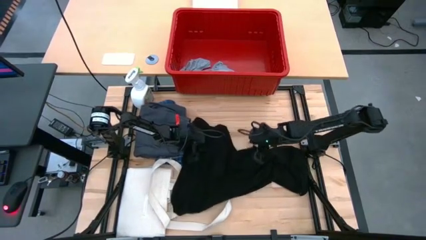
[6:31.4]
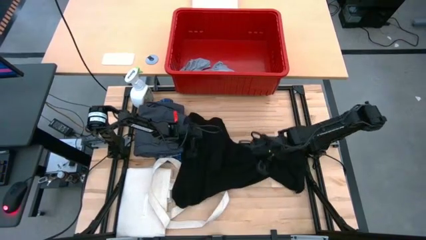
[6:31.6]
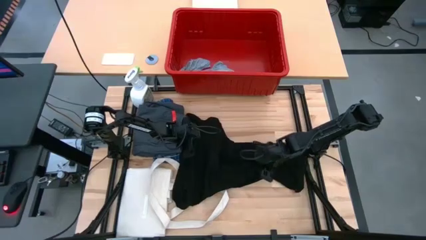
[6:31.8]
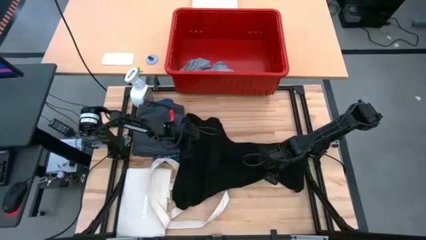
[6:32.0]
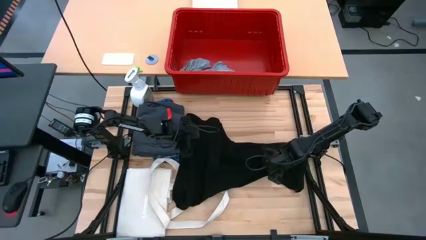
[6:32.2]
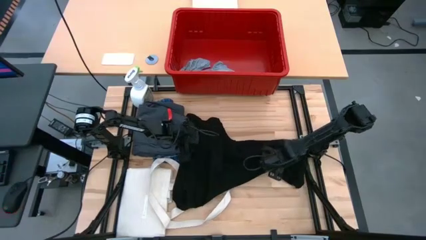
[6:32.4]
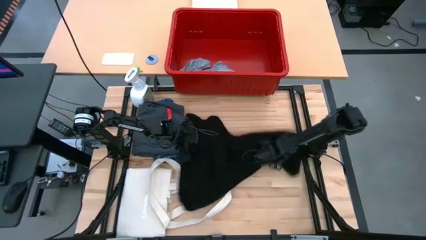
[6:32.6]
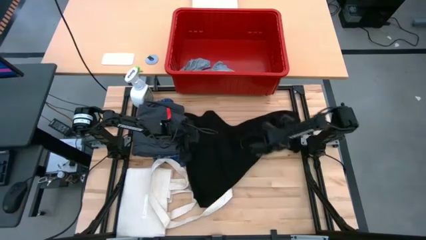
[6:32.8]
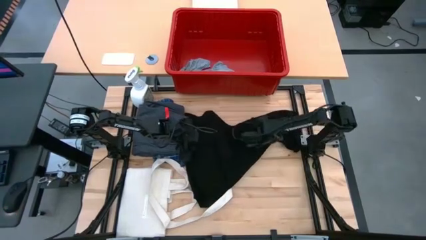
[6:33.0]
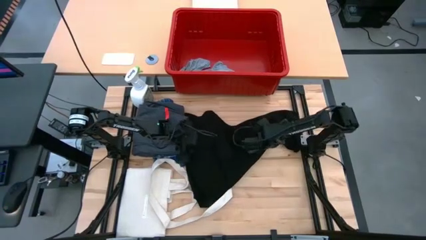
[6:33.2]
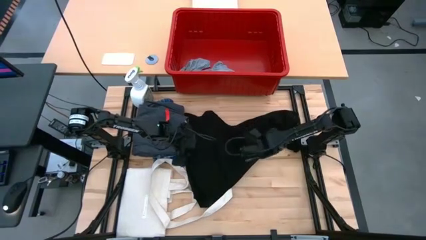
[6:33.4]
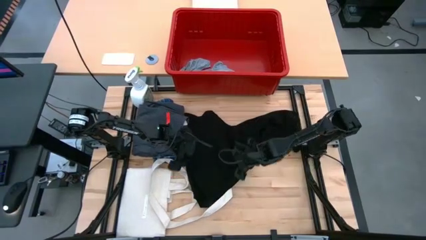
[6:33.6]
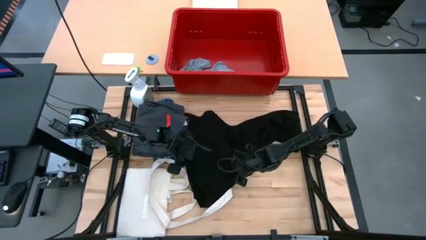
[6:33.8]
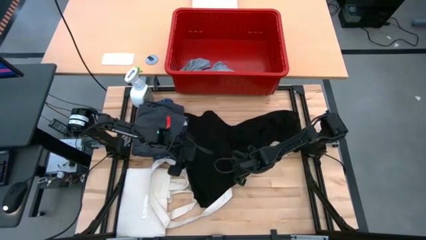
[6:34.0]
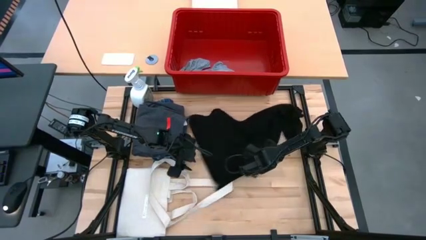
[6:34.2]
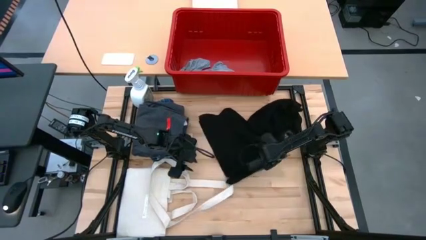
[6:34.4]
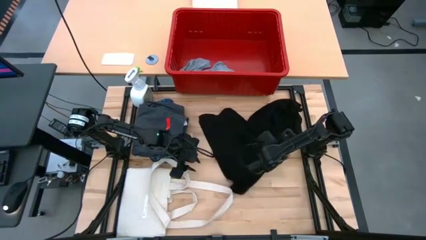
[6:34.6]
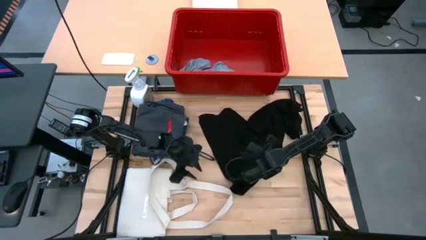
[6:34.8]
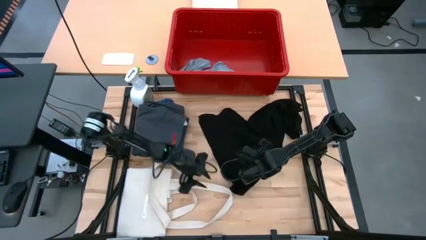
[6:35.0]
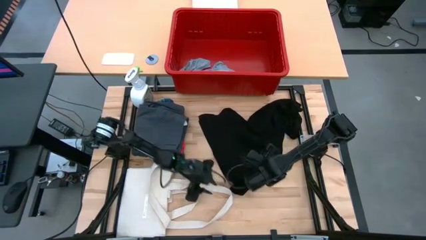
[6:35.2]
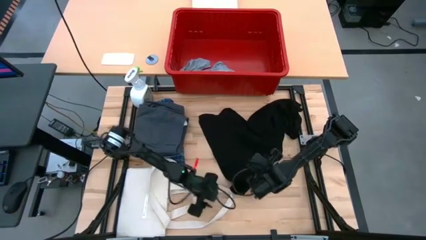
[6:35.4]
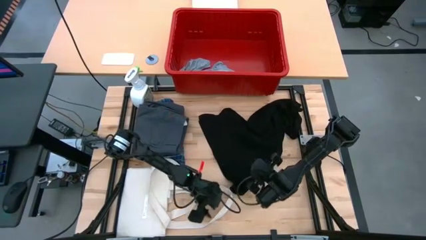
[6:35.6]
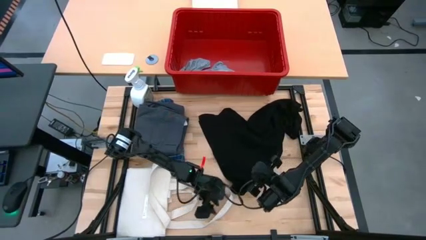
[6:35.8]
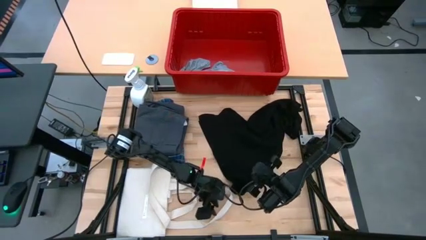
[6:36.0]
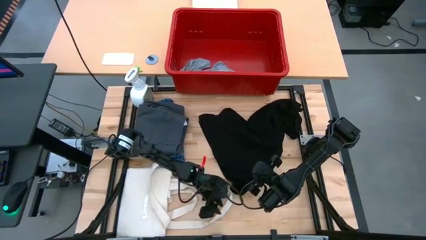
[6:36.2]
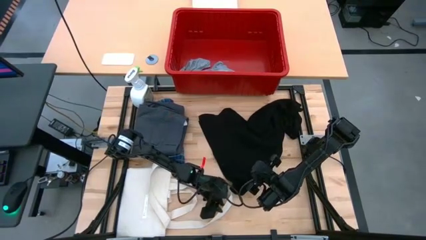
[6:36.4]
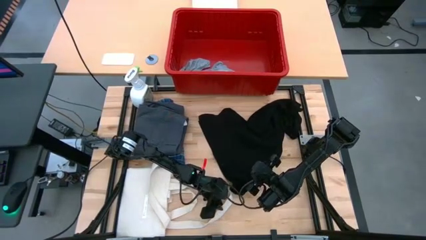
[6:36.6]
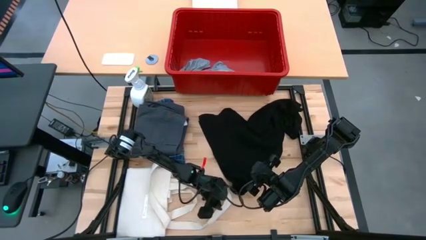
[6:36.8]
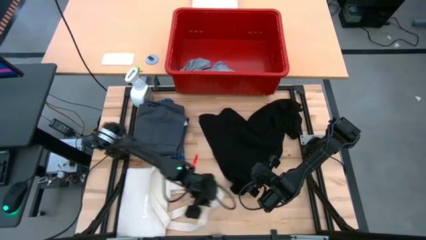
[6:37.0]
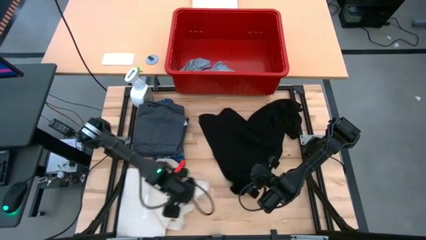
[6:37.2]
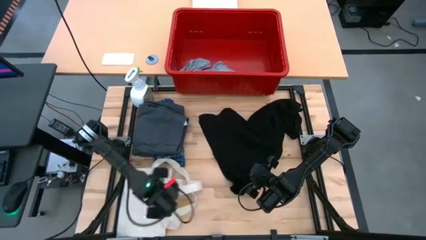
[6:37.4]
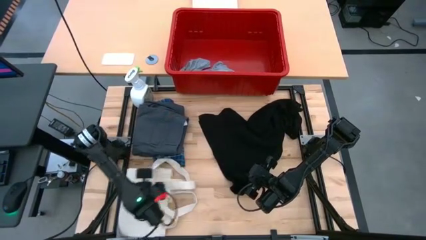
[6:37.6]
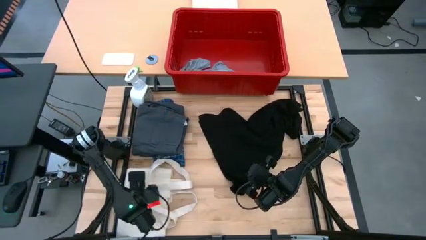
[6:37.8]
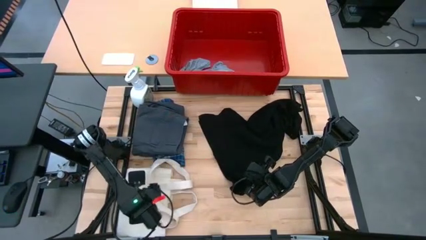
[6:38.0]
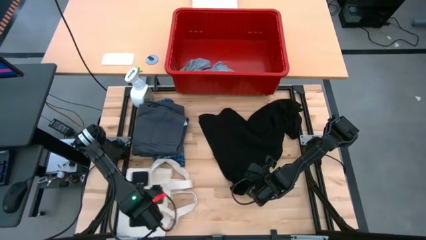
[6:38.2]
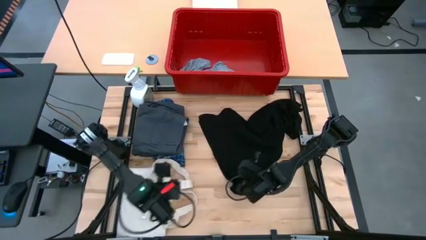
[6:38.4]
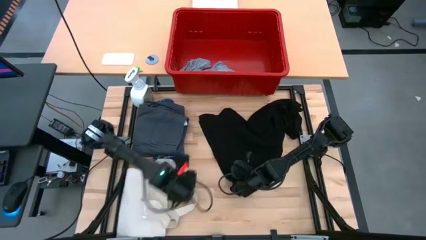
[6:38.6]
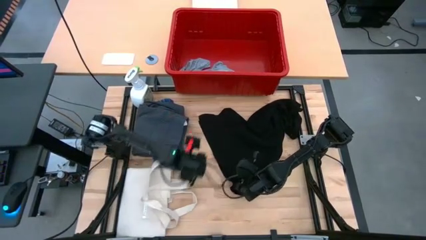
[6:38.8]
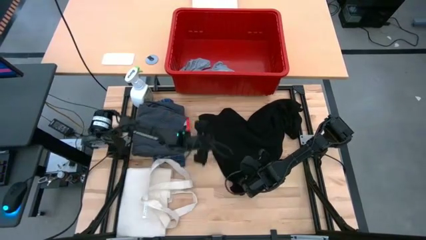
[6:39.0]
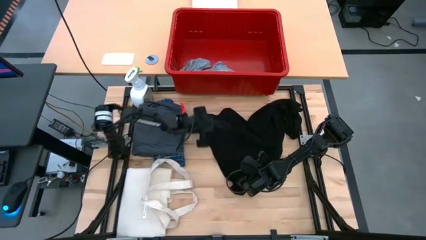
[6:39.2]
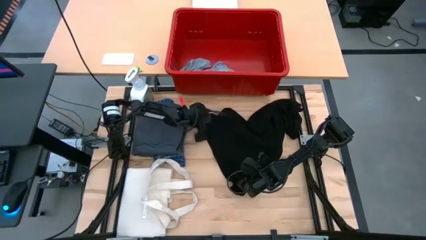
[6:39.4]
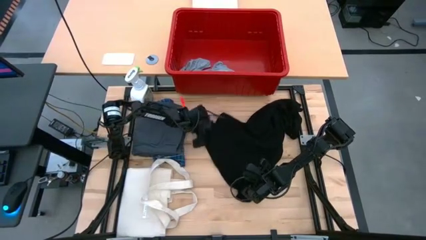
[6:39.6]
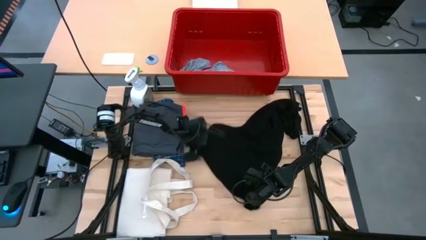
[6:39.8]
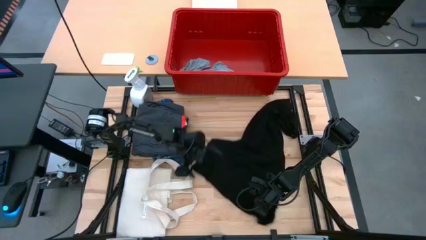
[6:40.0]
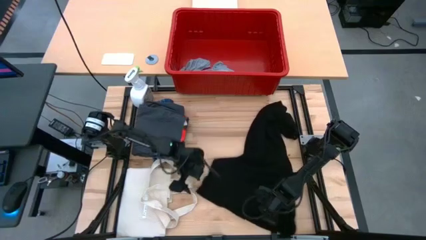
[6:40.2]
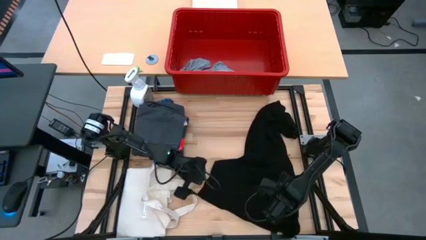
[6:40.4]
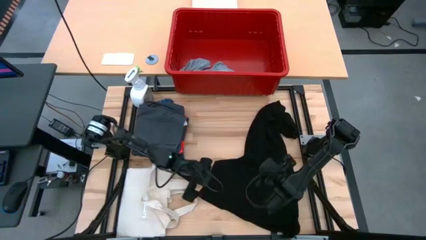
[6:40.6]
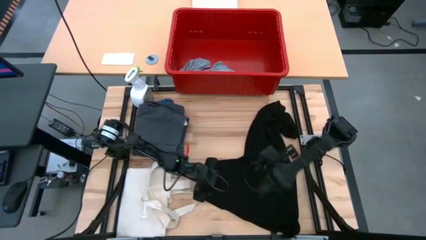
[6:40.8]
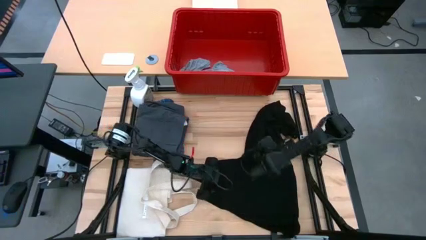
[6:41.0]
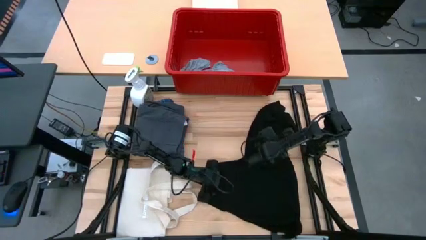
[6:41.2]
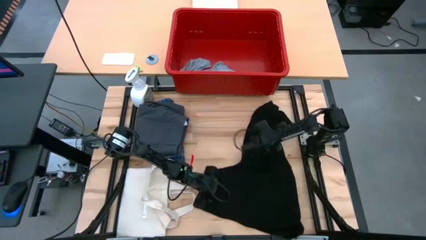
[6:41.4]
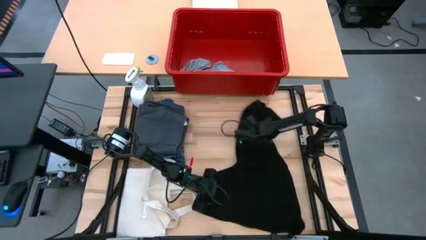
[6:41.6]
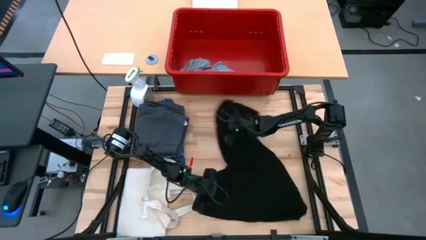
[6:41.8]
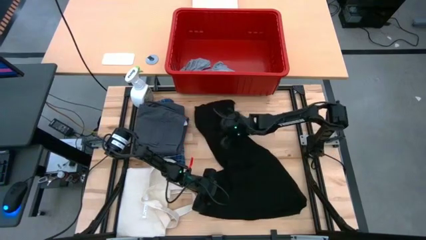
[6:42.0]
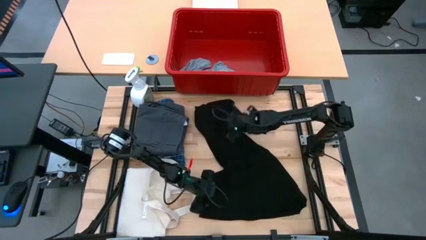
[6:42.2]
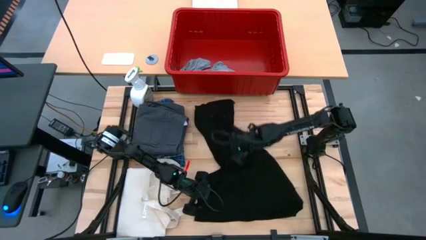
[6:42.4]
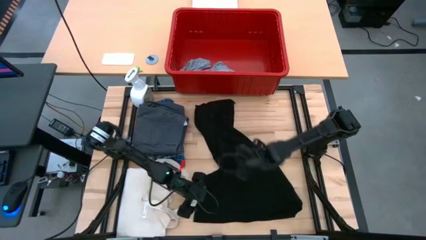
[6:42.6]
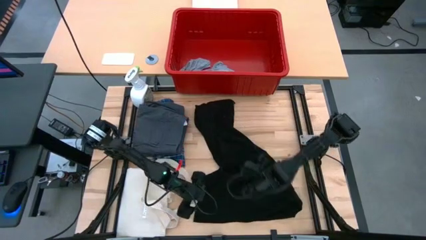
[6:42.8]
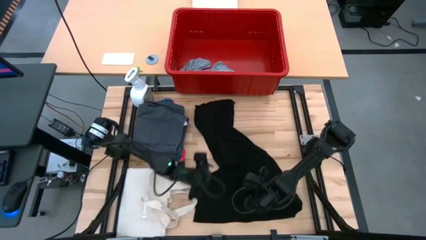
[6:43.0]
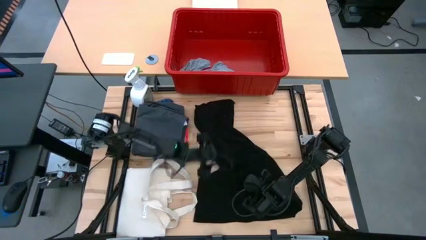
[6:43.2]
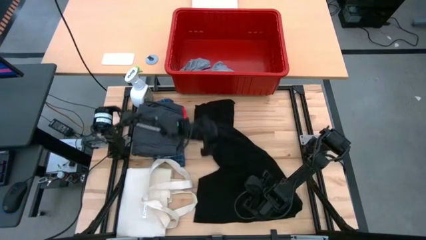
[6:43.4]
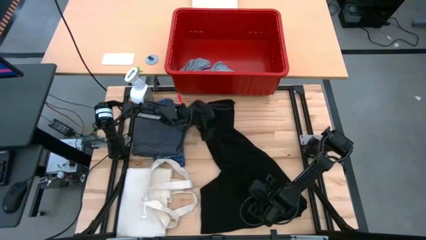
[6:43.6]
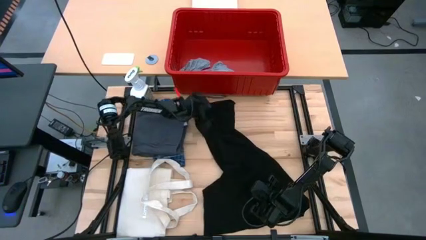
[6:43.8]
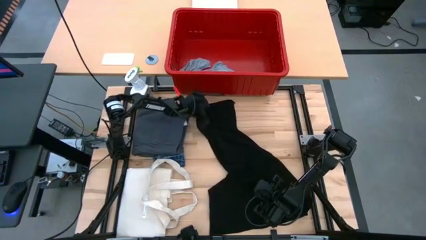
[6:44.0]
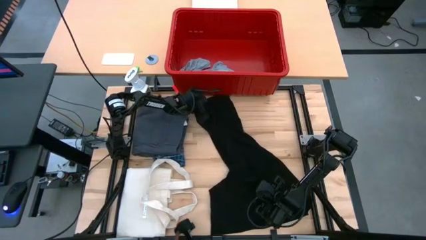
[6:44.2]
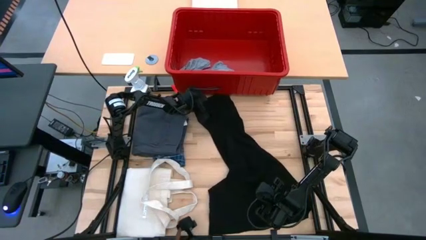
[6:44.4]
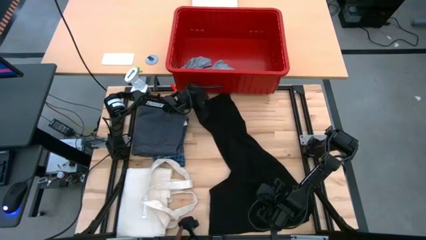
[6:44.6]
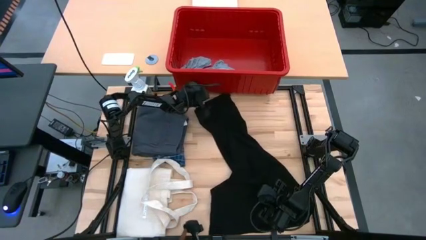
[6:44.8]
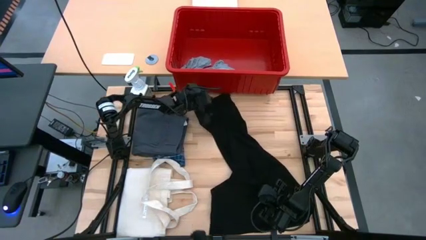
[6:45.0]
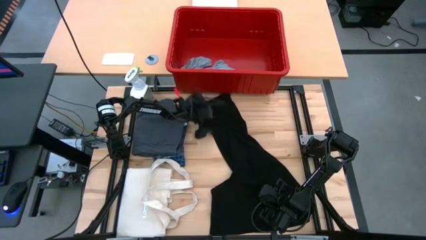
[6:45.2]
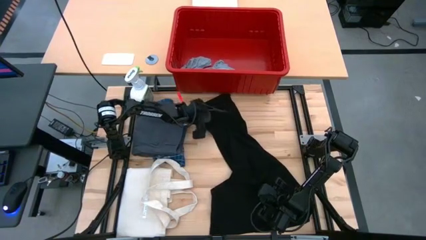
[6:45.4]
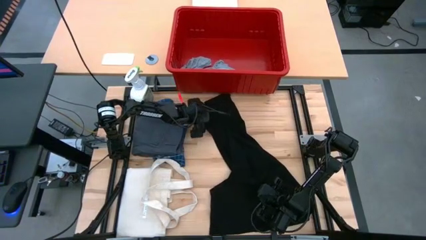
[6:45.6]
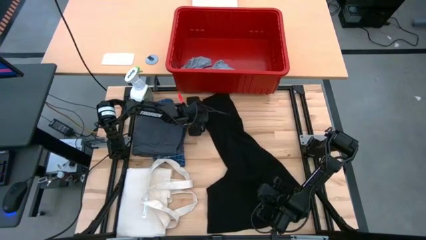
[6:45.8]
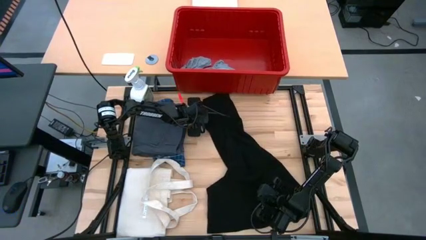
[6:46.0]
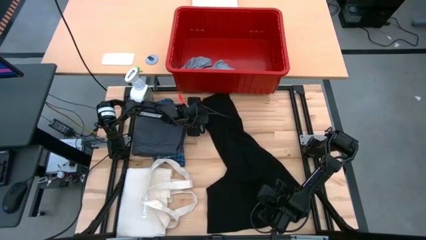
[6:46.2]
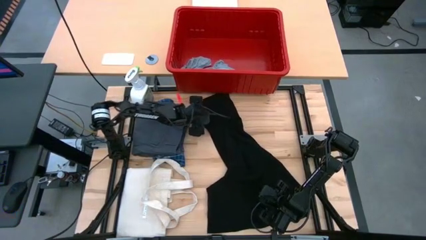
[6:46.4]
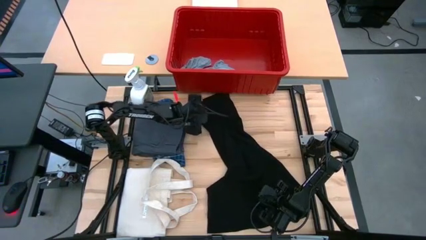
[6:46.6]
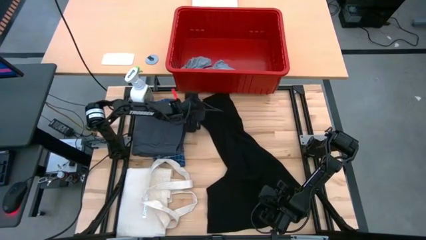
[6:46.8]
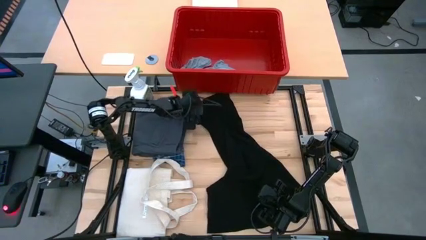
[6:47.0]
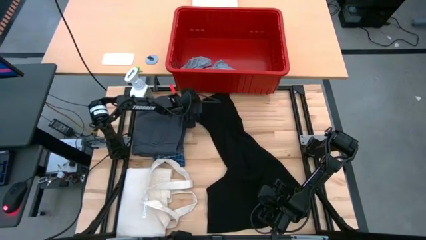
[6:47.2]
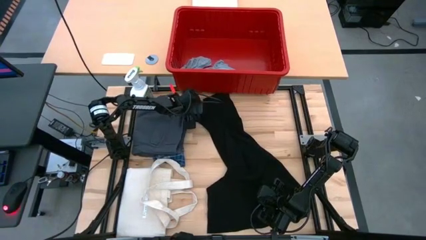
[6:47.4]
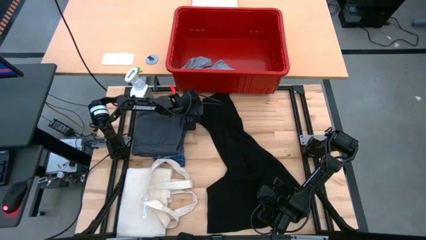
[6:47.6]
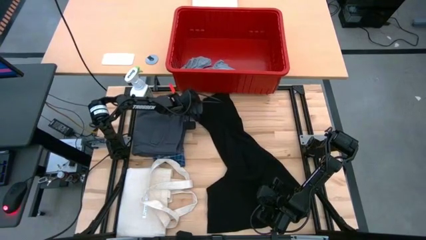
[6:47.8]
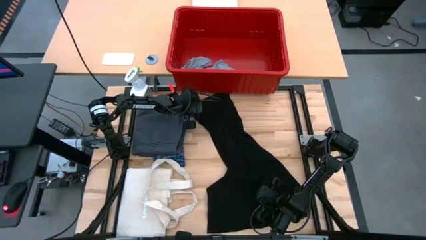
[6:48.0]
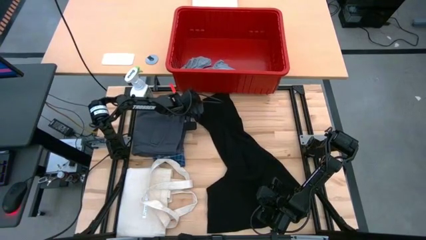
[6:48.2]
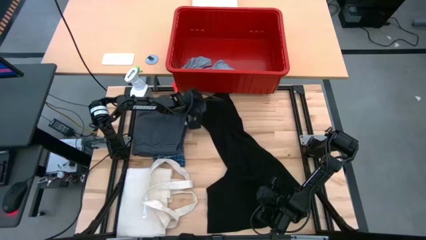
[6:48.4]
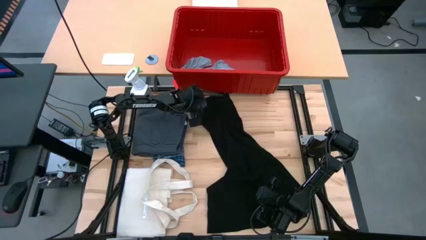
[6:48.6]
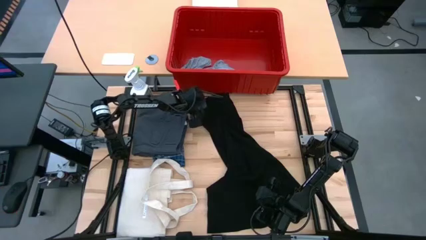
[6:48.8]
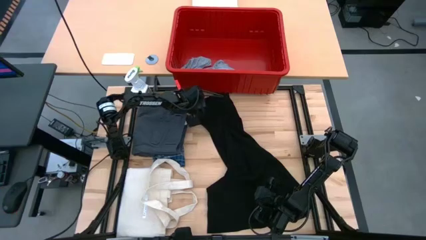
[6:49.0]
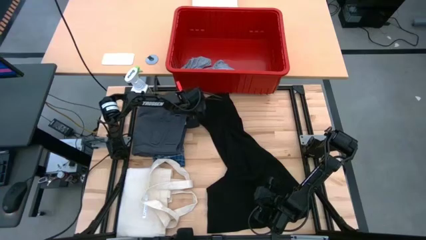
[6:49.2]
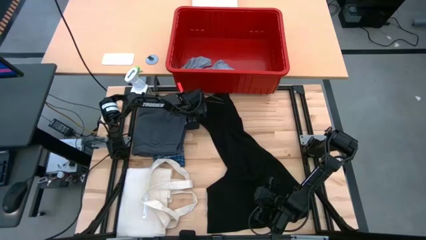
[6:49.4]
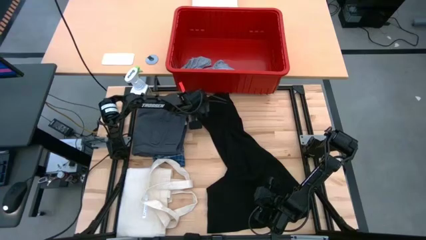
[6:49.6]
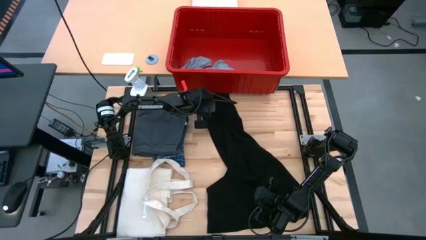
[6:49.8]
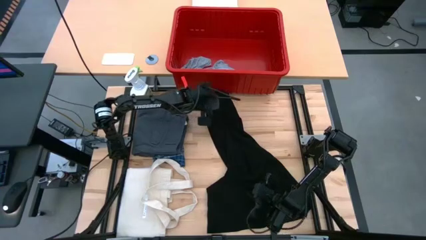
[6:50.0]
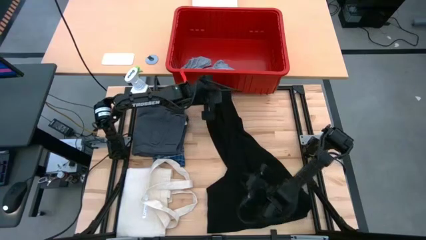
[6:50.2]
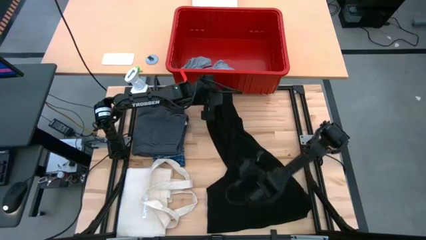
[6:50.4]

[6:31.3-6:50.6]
Task: Fold Laundry from Bin
Fold the black shirt
